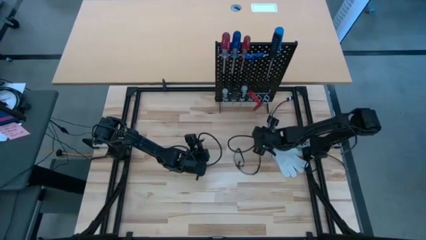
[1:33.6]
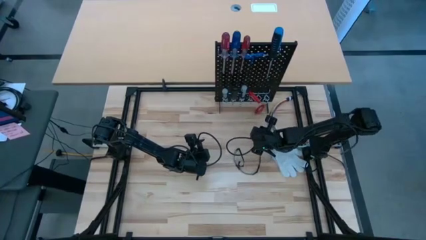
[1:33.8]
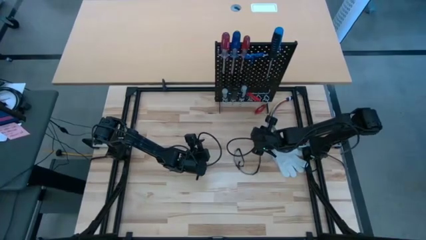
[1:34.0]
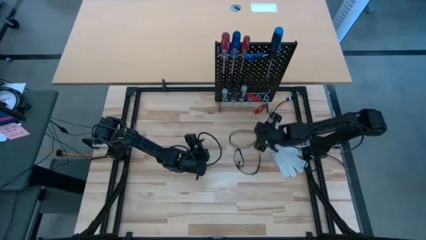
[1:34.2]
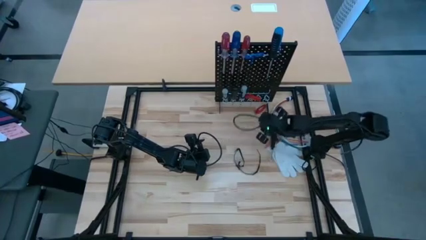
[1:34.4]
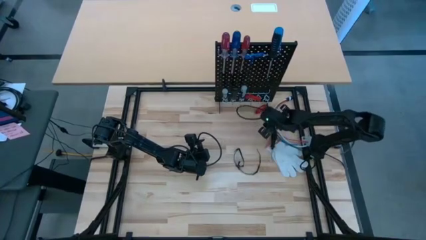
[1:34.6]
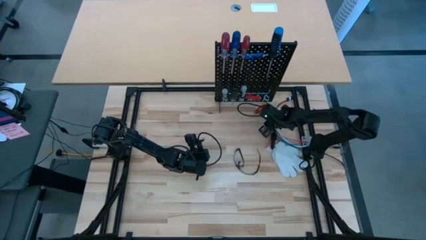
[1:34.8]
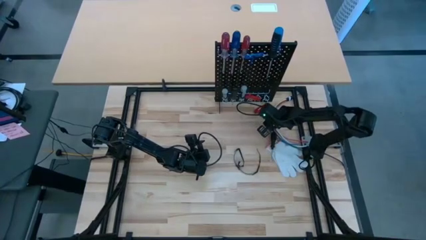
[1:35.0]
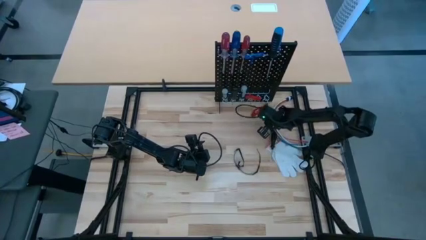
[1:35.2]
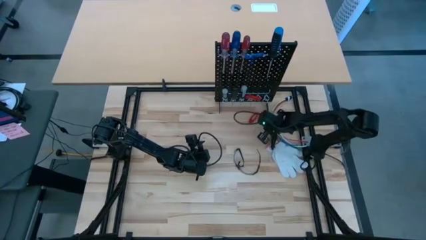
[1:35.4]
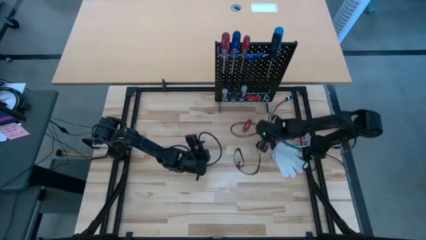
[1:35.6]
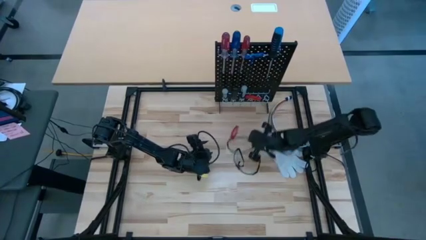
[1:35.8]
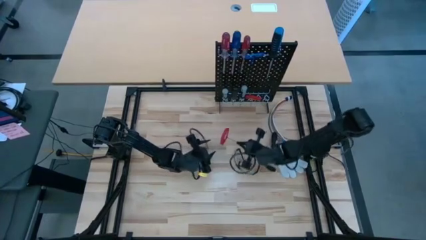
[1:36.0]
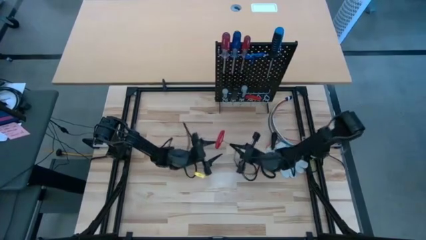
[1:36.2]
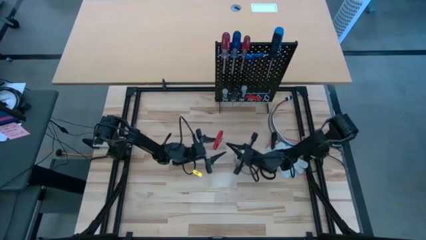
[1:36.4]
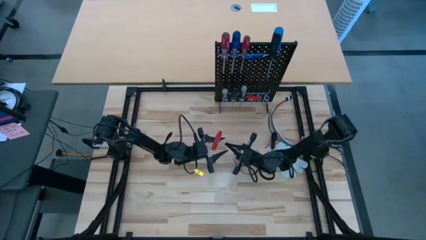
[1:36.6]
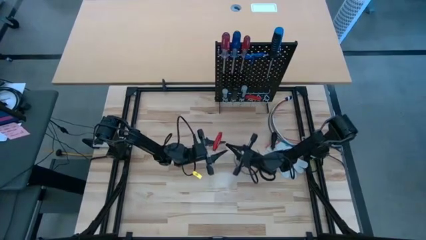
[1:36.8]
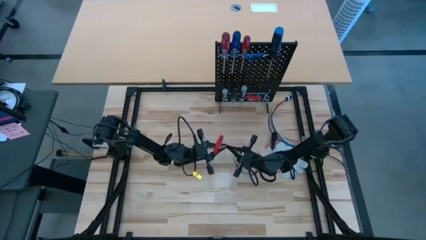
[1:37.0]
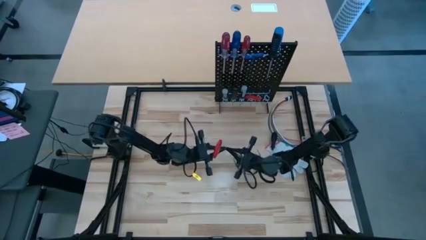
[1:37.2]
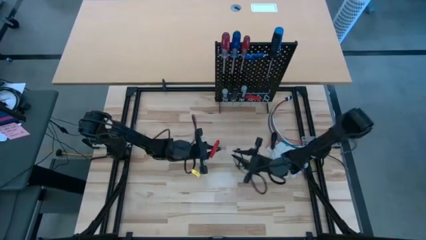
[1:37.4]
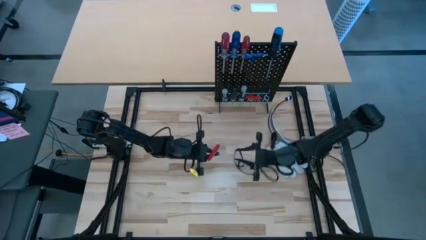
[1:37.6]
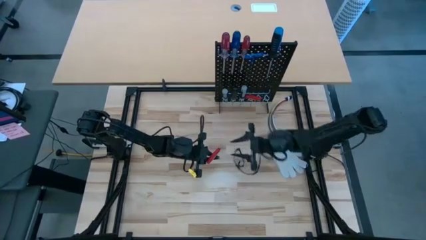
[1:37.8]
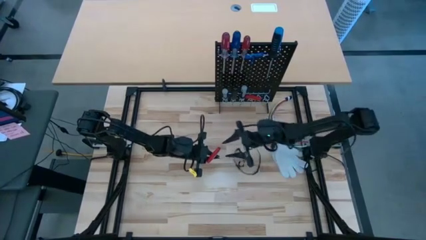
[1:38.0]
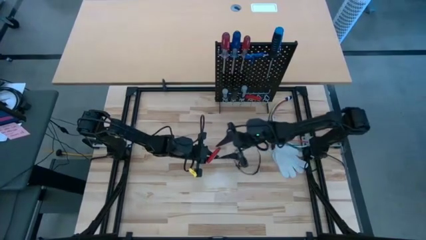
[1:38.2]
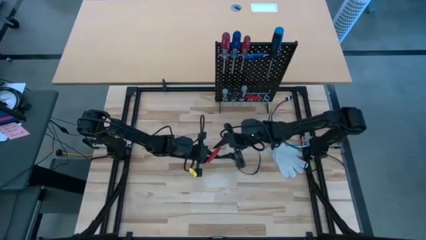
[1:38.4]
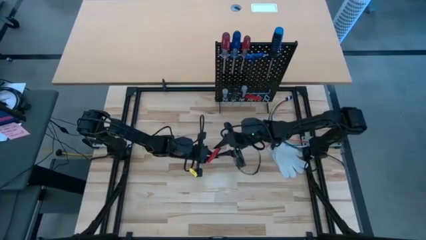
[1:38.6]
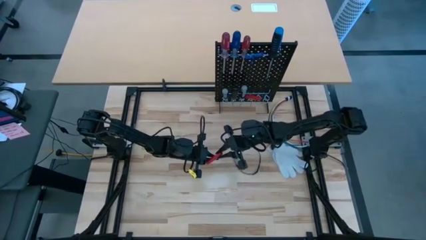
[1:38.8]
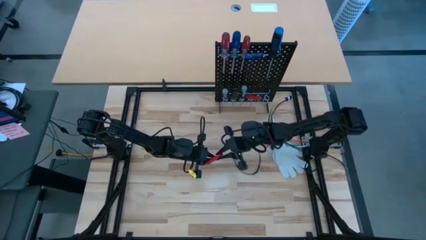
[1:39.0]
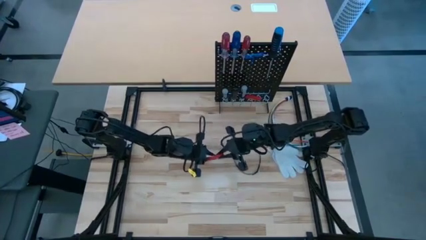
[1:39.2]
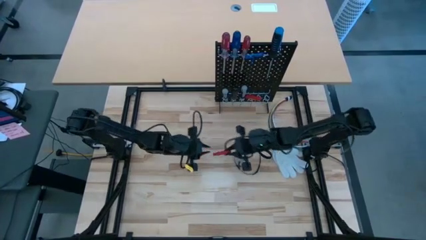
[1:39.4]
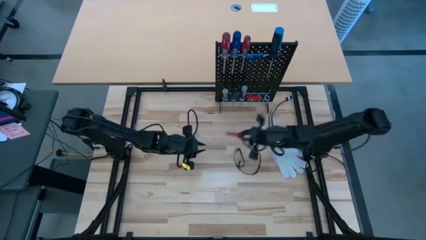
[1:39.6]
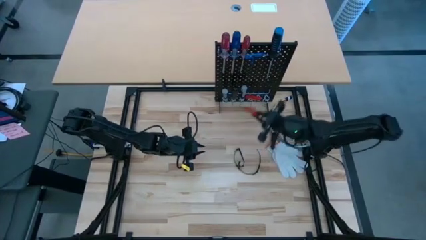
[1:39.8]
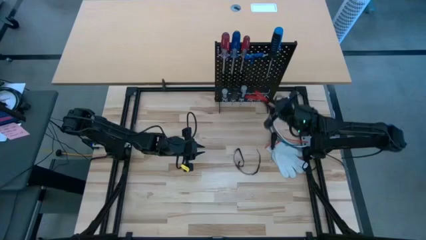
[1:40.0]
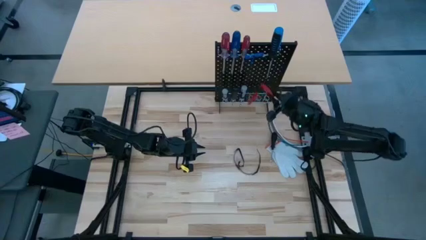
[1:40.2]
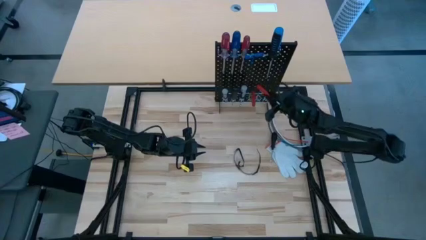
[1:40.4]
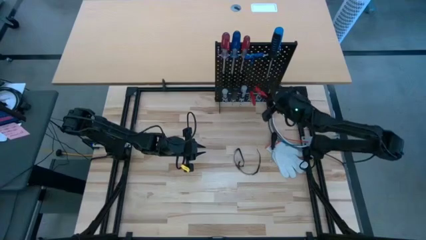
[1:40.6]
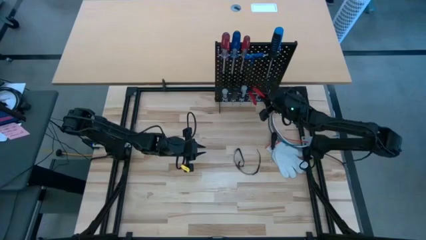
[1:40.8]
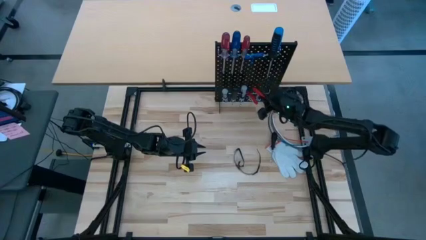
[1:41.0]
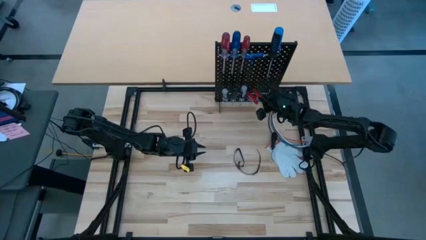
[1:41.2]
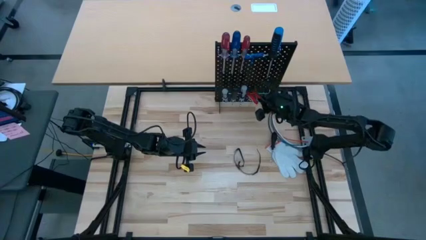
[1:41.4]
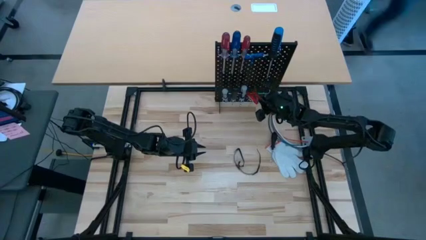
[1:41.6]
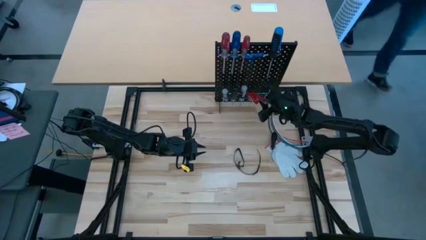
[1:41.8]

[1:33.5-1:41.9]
Task: Hang tools onto peg board
Hang the red Allen wrench on the pegboard

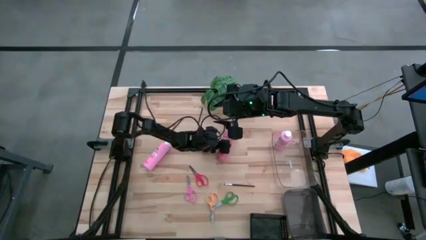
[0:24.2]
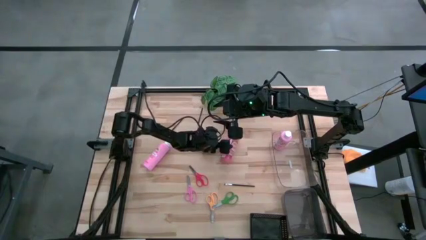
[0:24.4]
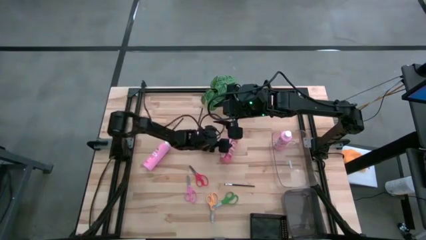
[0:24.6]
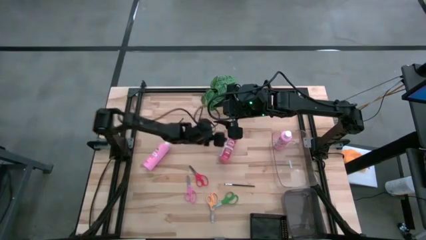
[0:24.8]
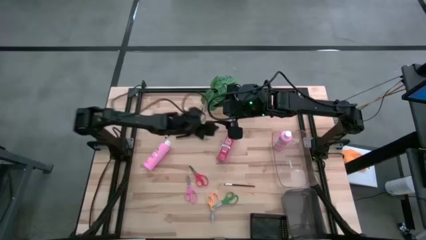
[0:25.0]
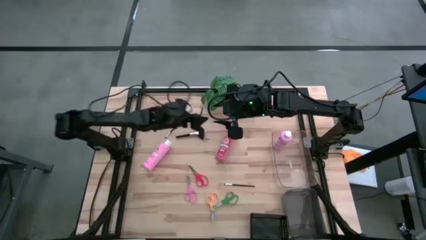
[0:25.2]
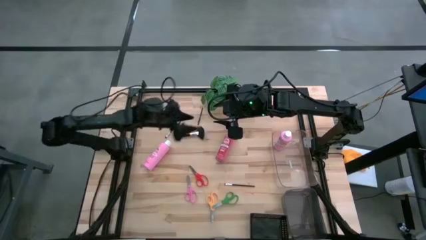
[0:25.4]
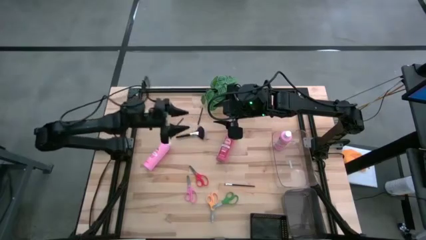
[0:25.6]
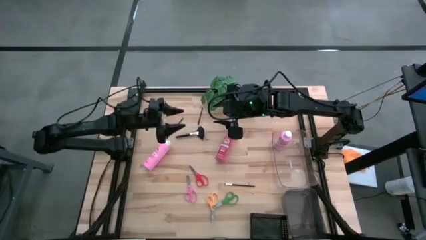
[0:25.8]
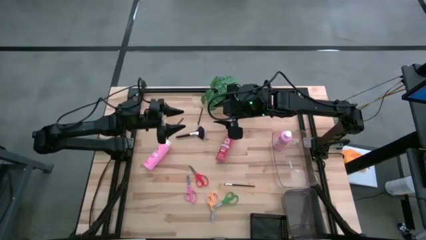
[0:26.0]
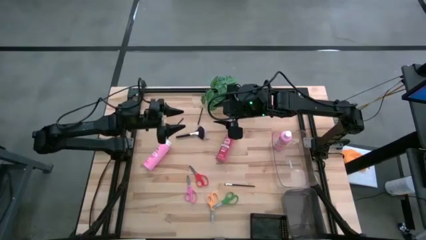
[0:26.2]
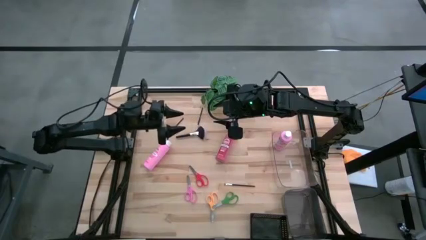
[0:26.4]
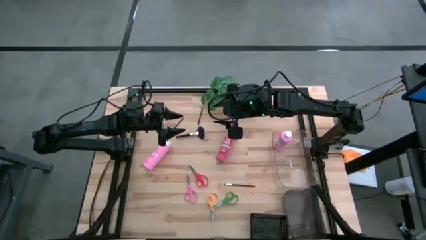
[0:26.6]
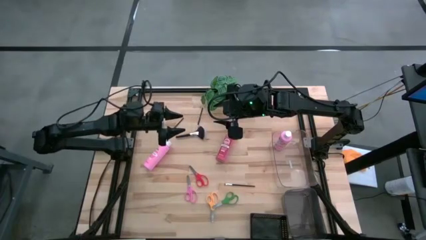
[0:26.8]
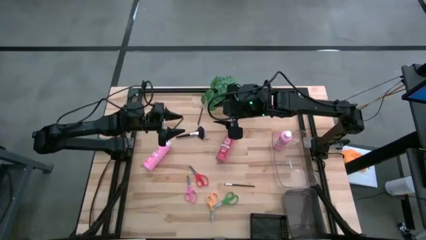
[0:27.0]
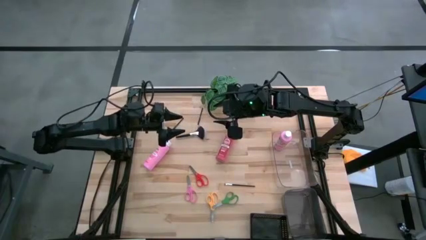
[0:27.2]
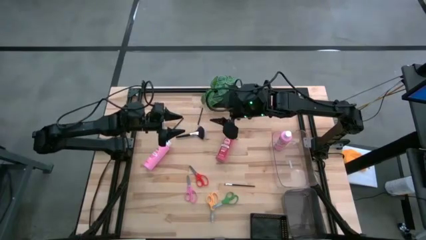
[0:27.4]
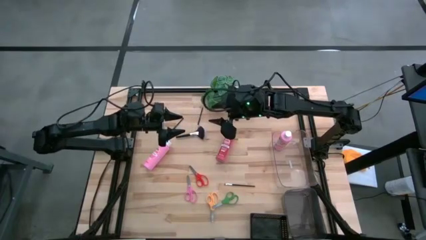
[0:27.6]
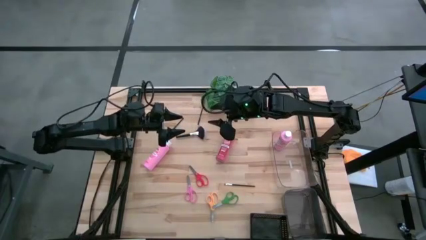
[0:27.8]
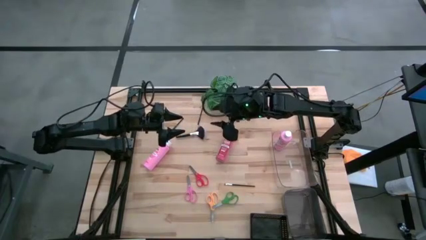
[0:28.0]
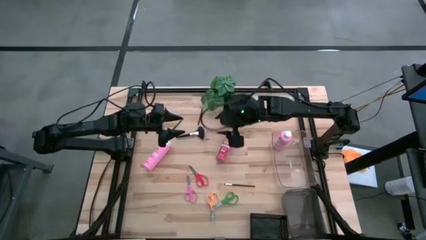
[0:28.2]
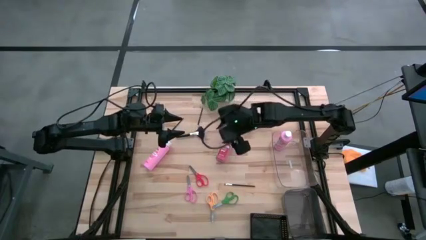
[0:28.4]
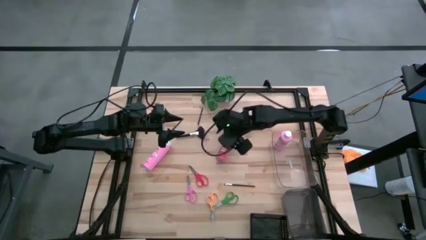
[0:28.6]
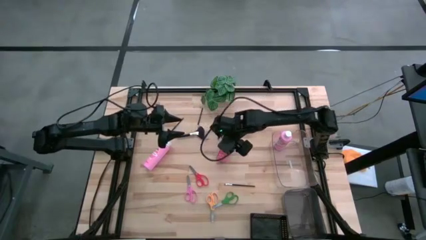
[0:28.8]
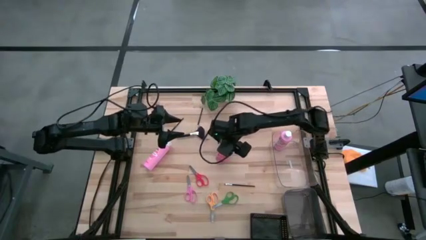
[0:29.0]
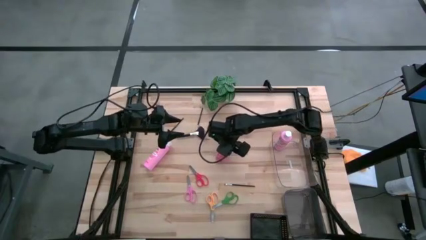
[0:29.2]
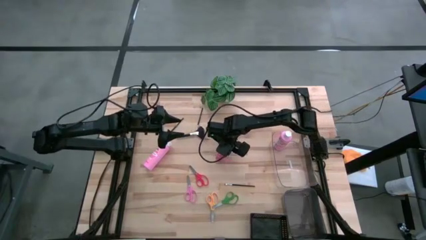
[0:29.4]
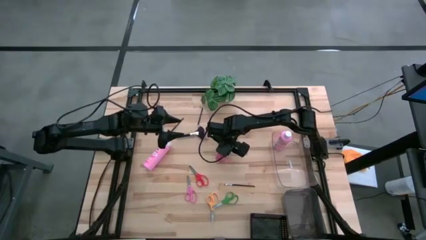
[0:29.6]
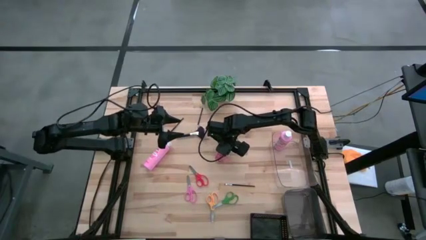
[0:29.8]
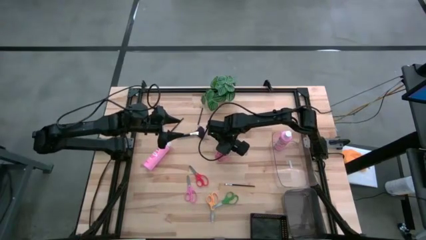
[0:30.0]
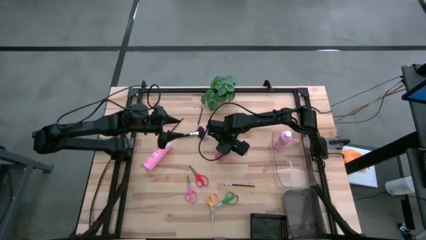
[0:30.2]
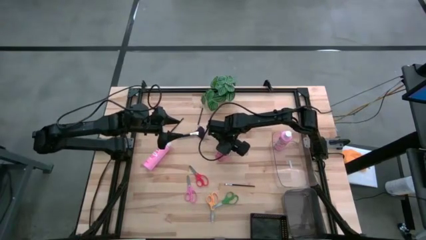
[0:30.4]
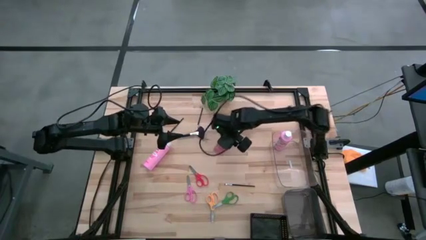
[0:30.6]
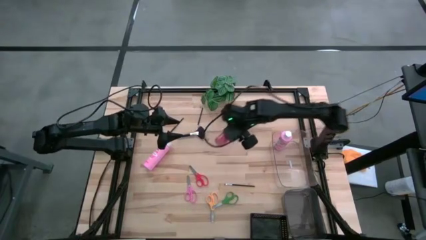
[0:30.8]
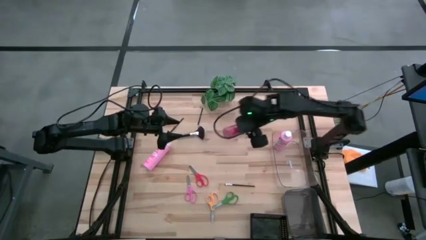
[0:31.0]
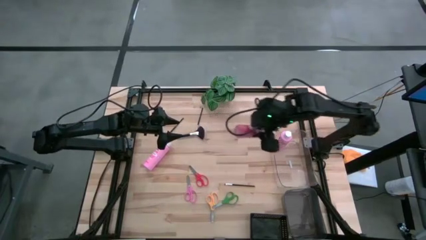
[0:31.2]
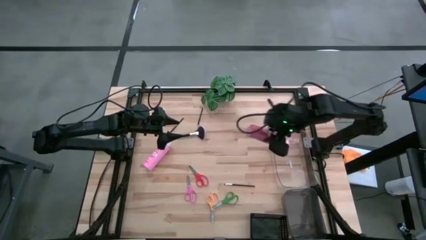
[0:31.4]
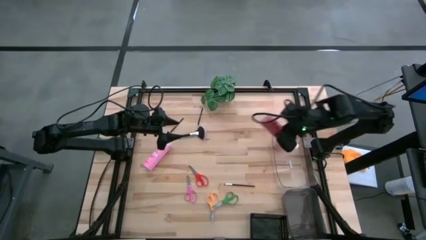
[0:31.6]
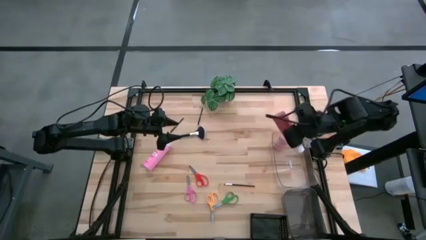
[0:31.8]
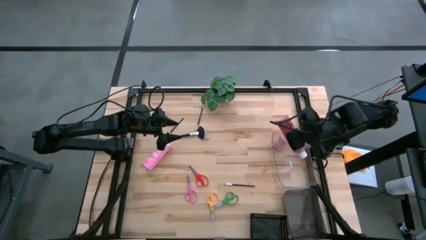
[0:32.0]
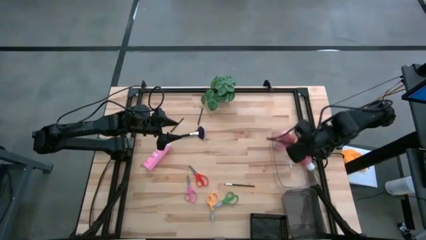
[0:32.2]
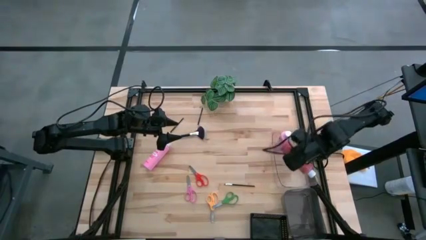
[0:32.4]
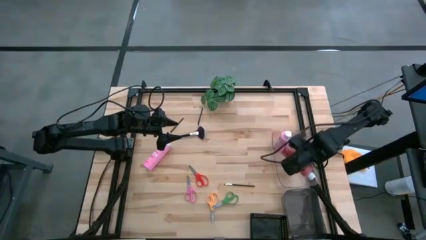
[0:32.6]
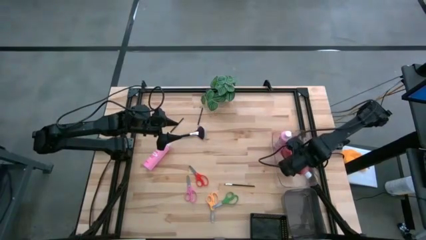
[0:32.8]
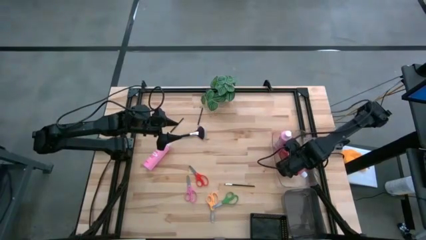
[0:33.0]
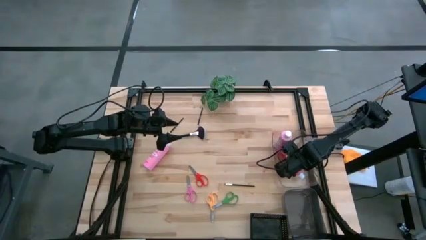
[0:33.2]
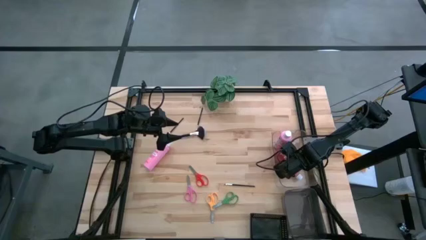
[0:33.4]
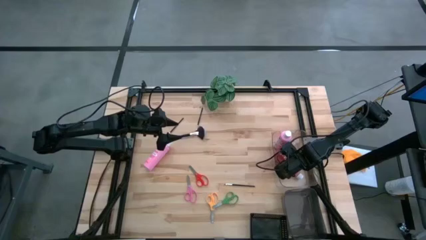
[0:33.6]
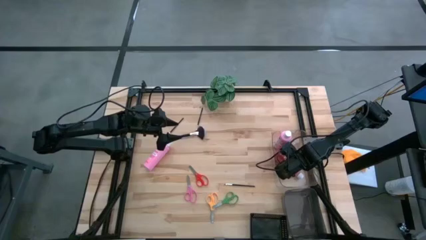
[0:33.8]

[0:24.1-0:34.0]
Task: Pick & Place Paint Supplies
Put the red paint bottle into the transparent bin
